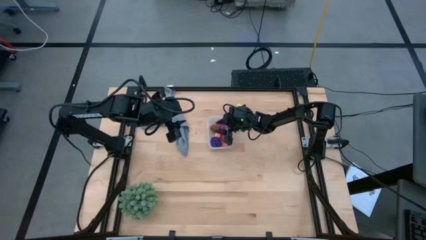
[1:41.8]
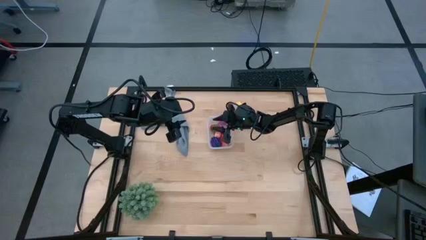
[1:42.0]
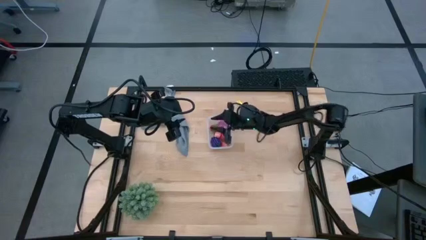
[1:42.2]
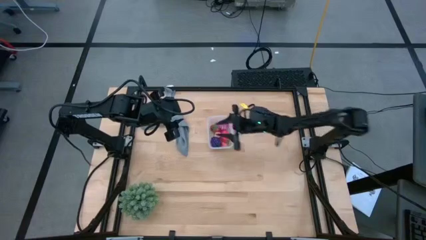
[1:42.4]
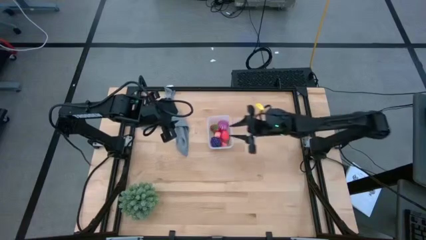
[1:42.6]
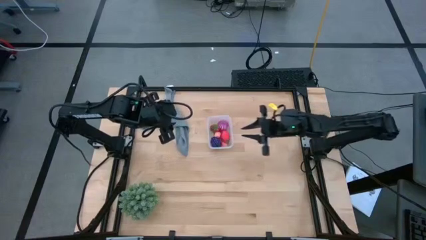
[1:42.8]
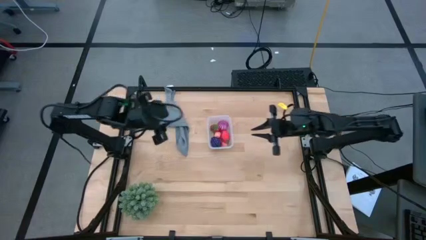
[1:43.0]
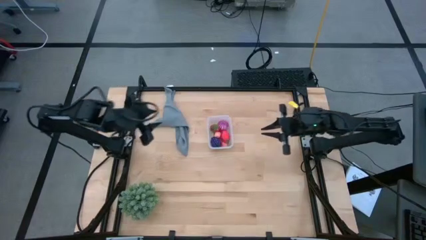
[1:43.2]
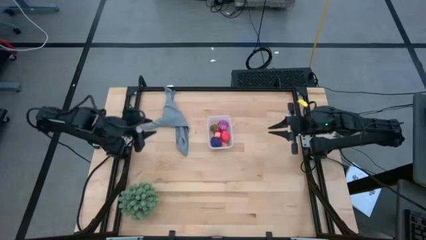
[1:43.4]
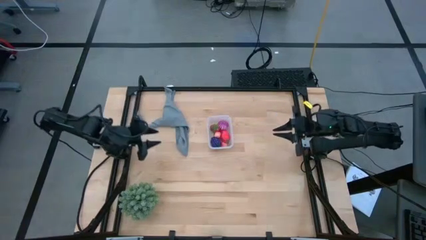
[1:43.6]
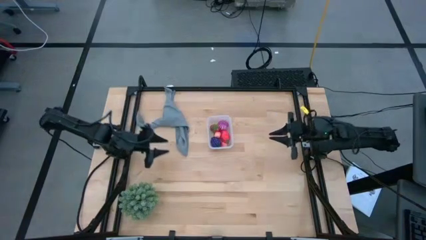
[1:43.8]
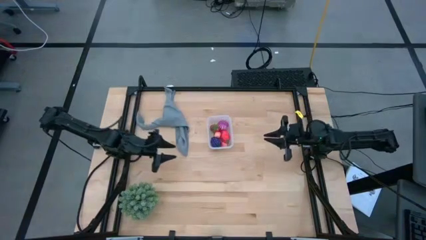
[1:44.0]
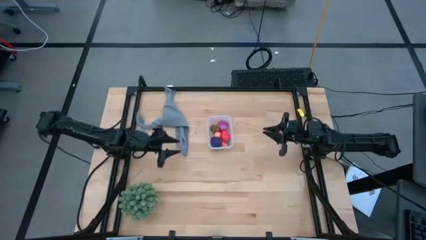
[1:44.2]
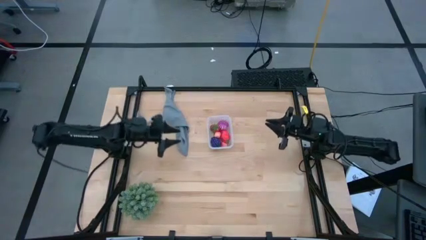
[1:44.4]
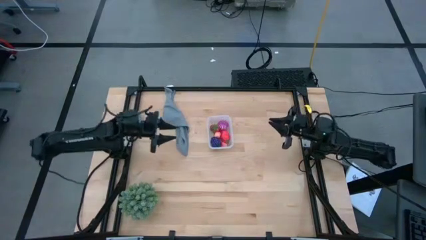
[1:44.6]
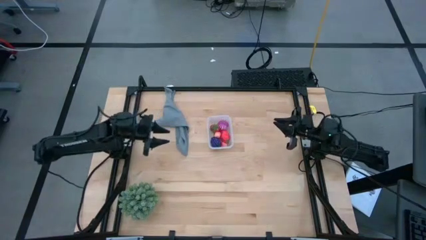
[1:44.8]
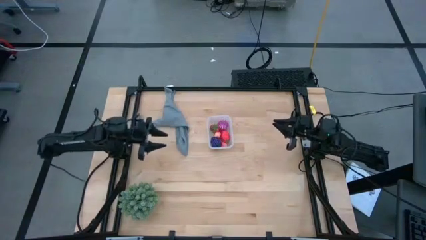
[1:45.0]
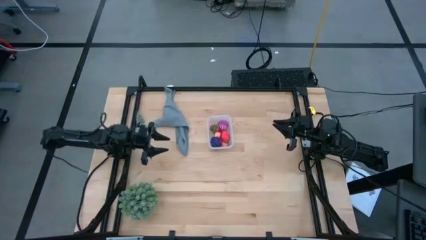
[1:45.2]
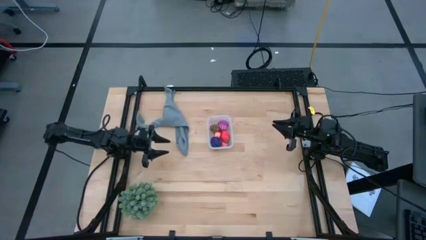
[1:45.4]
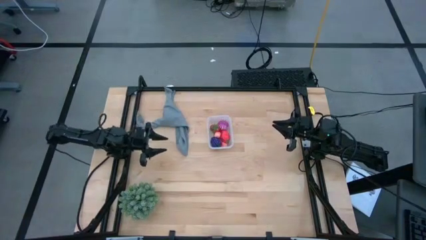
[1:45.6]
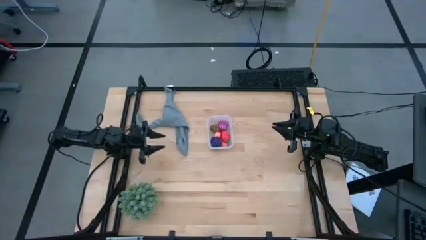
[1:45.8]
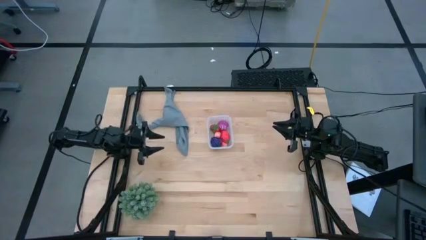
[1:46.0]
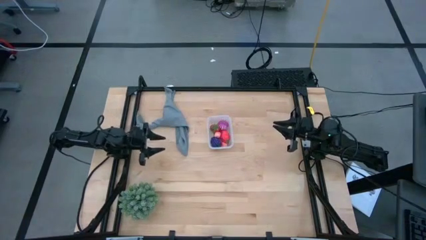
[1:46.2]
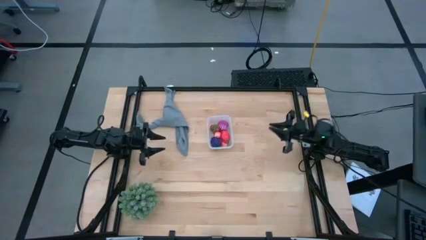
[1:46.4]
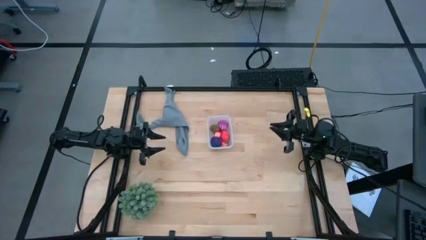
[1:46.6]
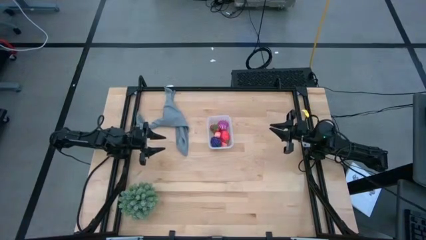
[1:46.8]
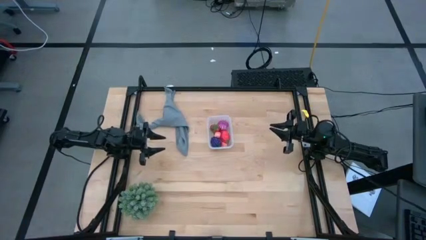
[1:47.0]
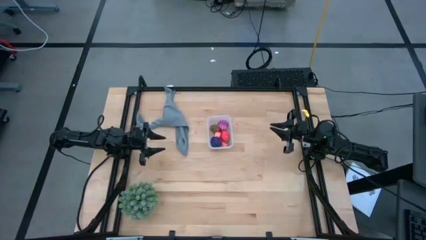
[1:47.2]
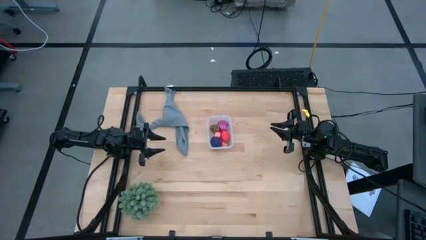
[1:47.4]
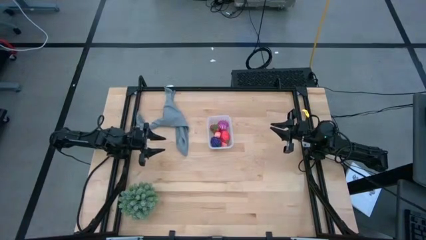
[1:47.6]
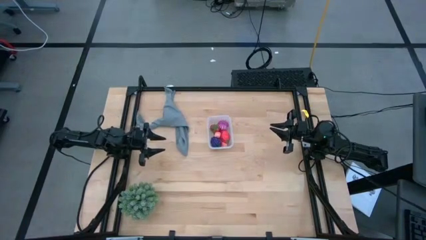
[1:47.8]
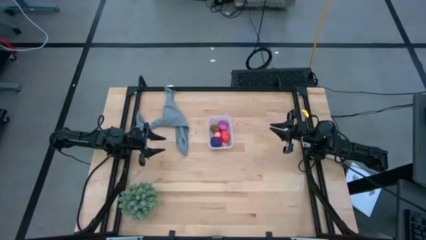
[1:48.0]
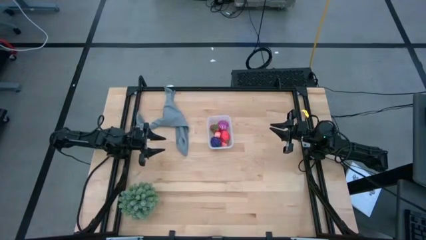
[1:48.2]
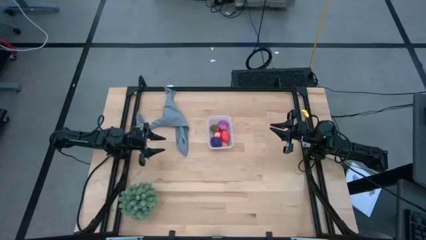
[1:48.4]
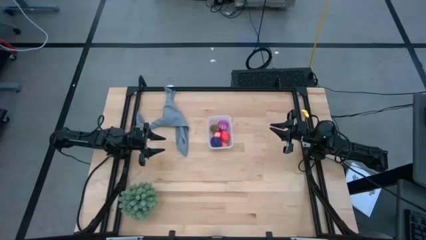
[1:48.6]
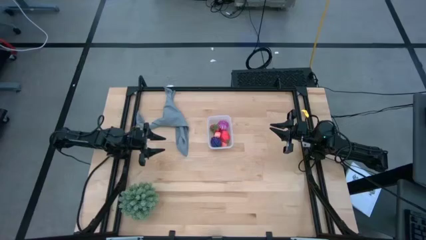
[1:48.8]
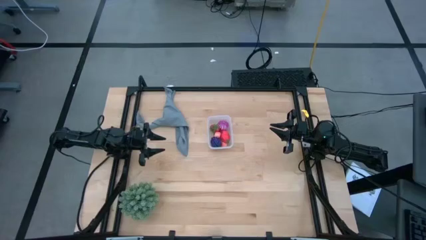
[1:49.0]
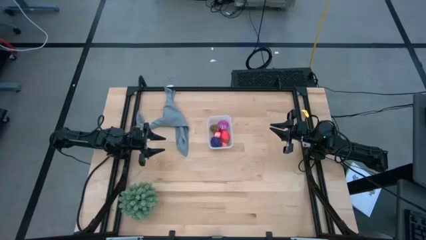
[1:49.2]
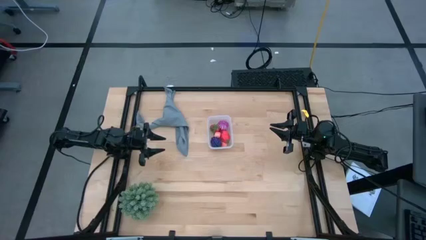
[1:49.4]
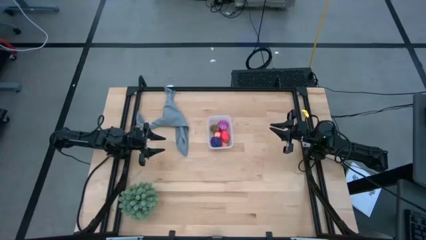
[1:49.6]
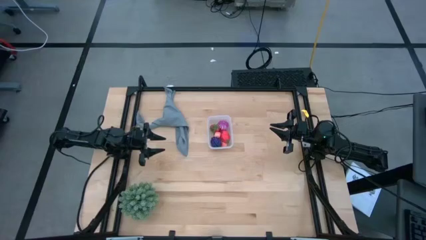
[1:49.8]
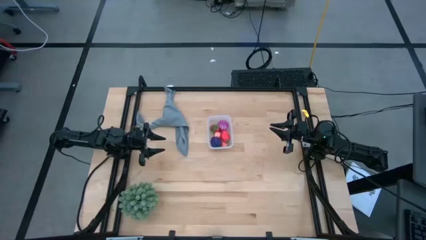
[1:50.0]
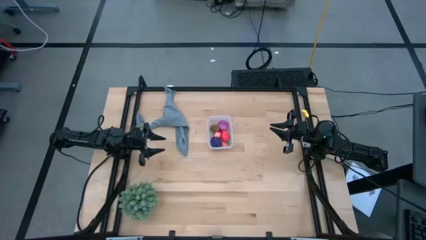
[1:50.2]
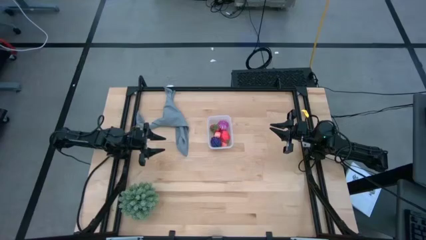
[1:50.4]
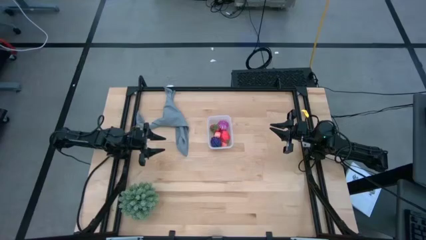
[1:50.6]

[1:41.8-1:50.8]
Task: Pick and placing Produce into tupperware
Return to Home Position

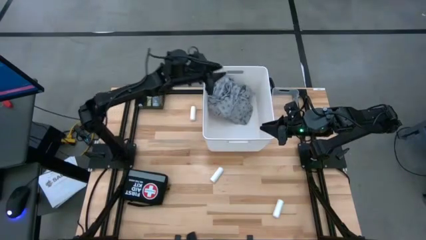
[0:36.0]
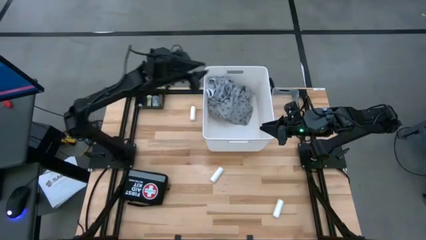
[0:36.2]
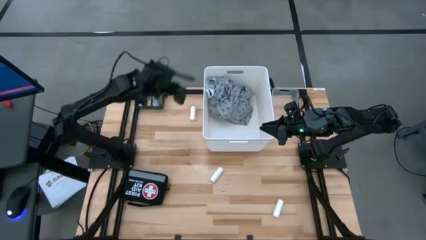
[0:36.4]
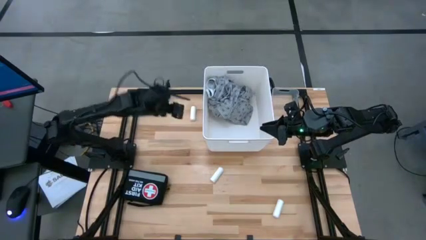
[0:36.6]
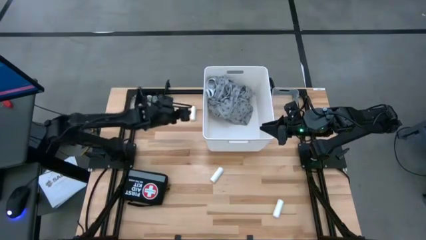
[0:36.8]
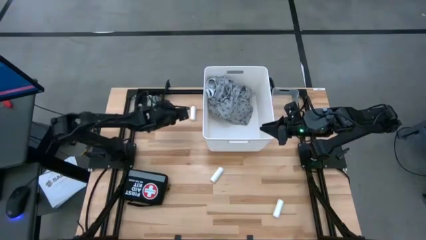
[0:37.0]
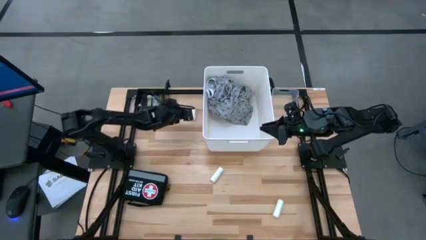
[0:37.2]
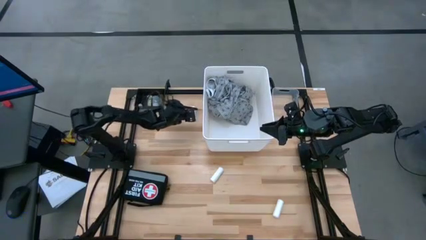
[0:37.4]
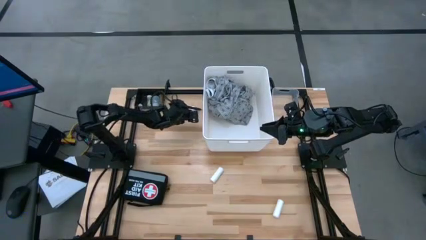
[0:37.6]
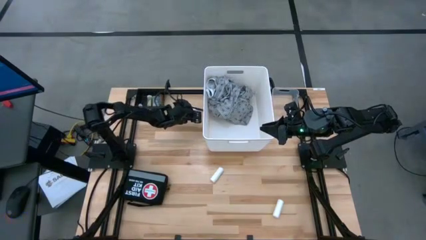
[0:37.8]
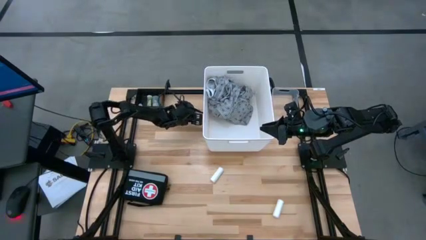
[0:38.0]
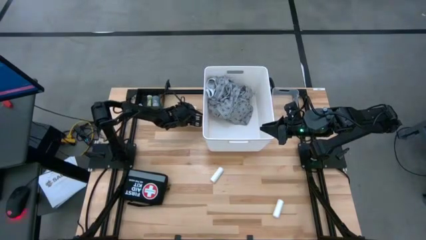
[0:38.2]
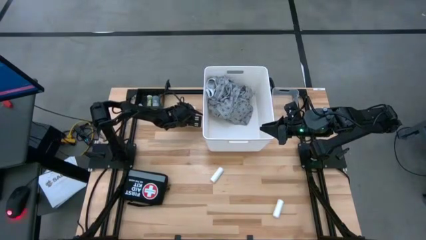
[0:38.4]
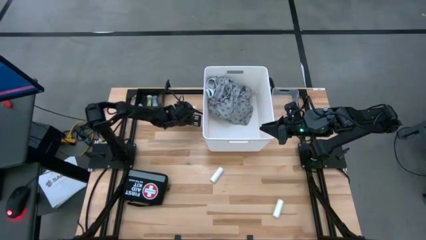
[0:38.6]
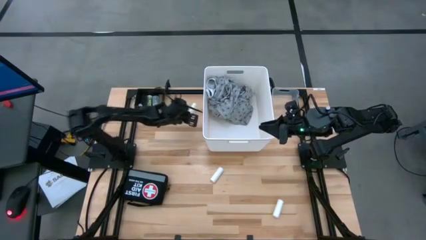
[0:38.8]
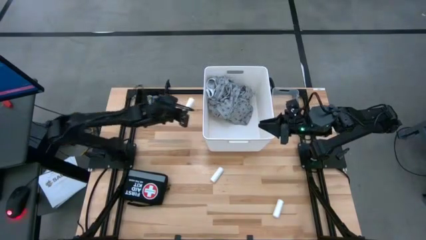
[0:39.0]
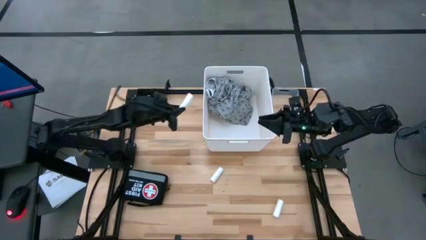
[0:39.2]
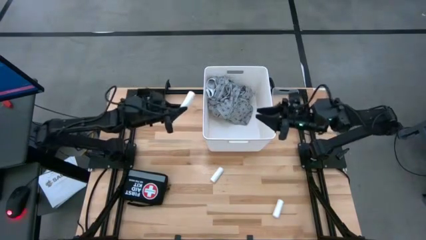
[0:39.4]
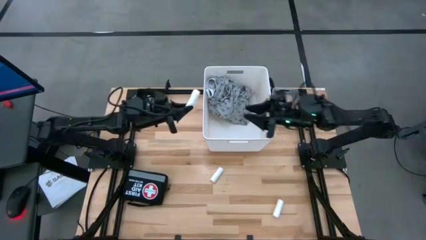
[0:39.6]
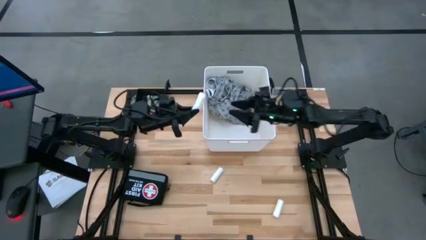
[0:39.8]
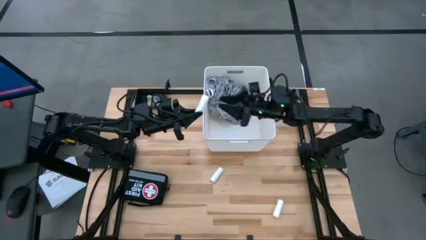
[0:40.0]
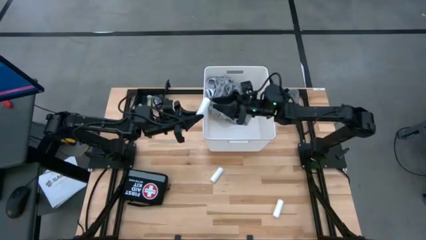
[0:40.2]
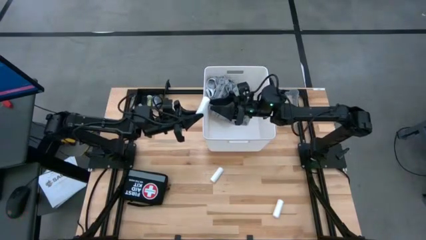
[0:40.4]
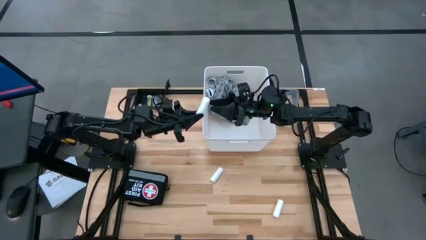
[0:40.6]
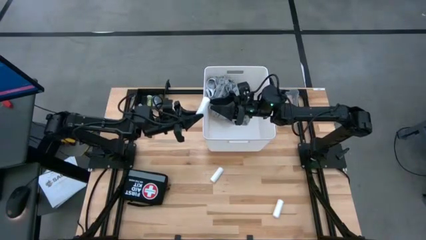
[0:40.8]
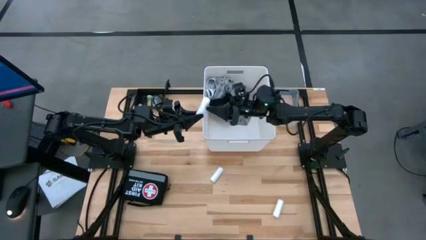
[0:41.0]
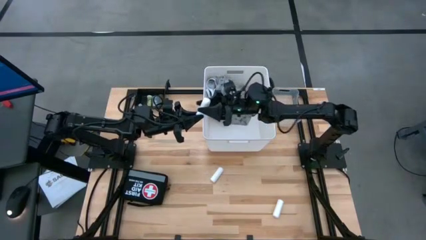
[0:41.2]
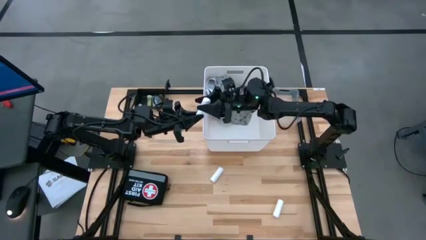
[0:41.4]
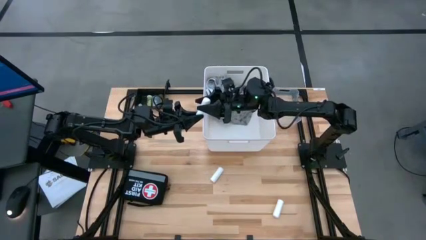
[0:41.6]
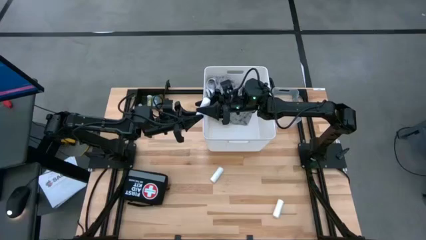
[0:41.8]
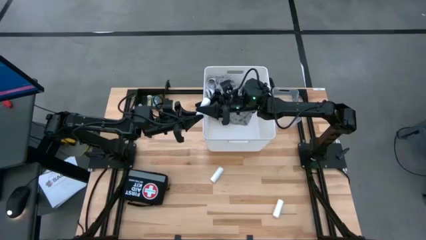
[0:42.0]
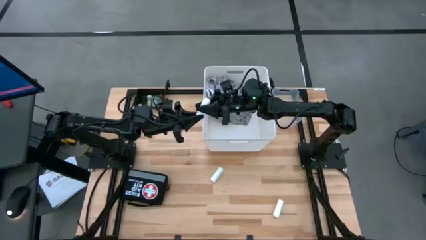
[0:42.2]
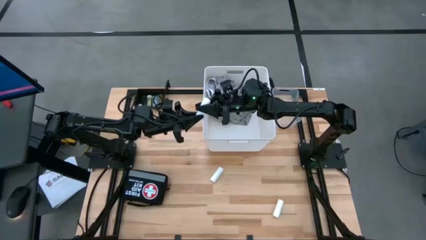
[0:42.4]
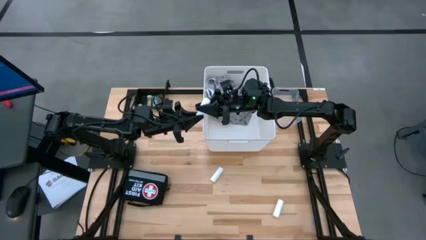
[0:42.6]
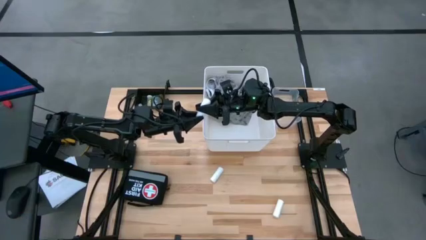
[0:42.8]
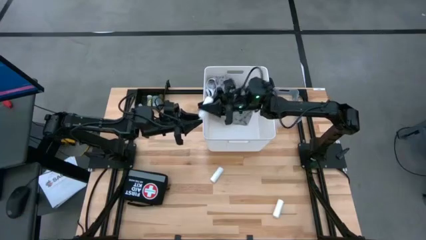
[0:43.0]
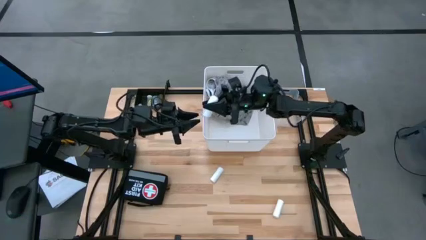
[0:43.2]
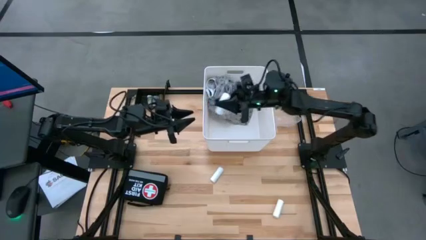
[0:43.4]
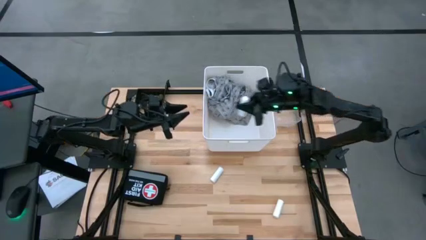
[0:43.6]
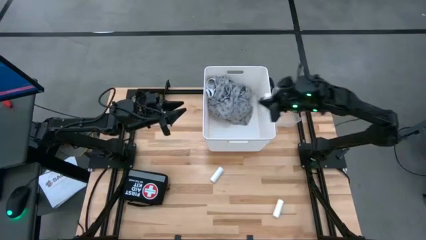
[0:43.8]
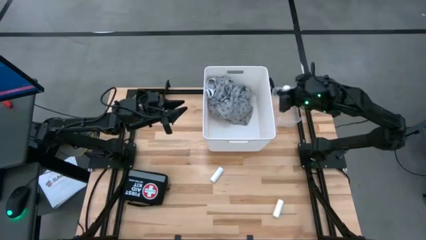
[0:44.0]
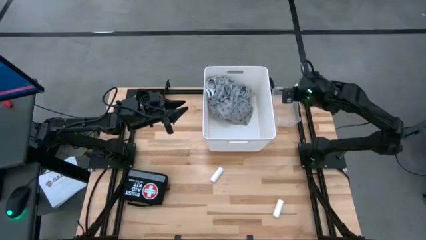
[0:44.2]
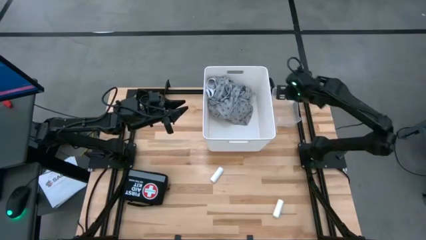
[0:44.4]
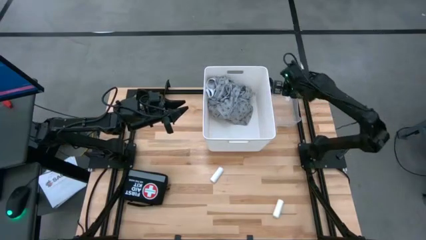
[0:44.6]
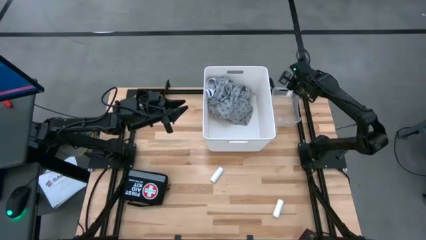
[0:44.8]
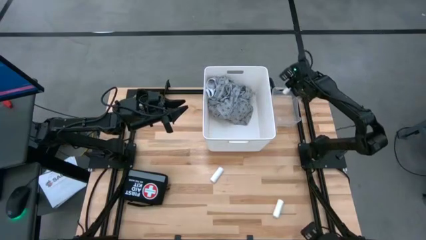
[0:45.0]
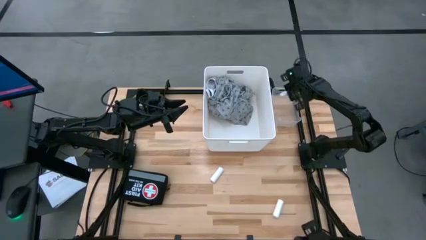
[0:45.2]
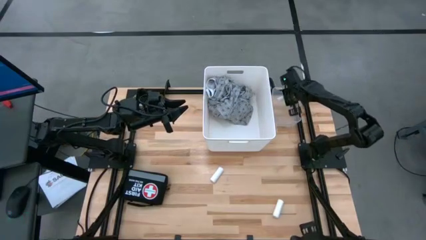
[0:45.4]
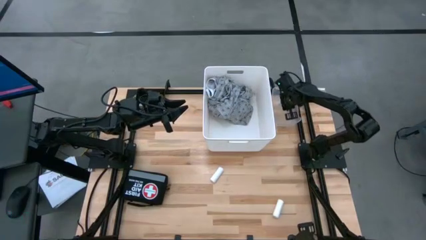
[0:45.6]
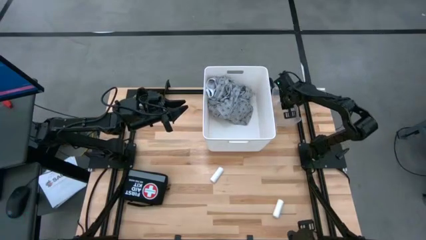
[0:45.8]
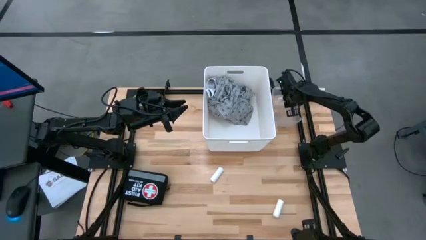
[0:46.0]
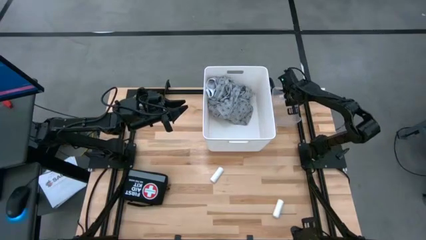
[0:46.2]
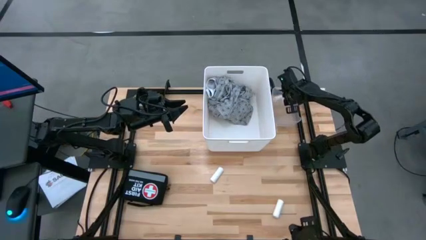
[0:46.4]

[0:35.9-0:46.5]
Task: Pick & place medical supplies in basket/bin
Put the top white gauze in the transparent bin
